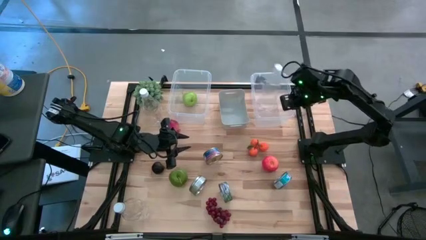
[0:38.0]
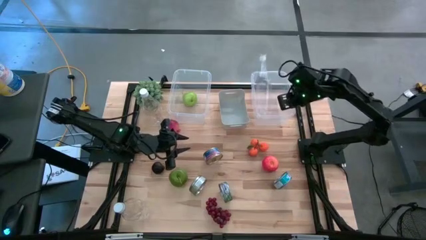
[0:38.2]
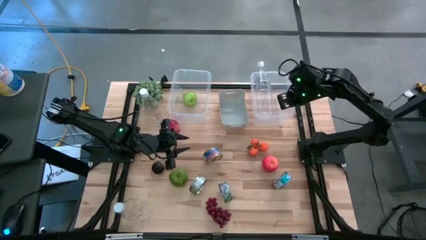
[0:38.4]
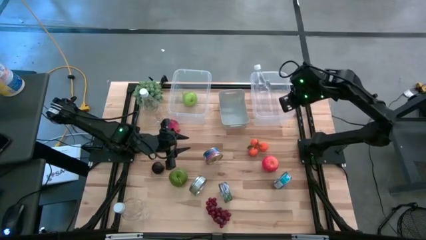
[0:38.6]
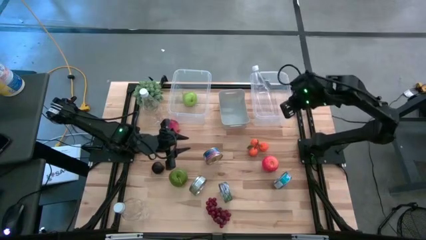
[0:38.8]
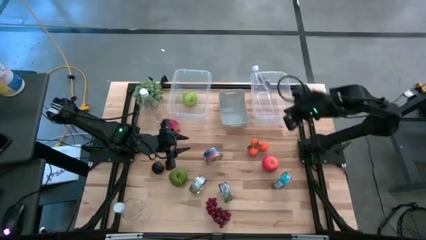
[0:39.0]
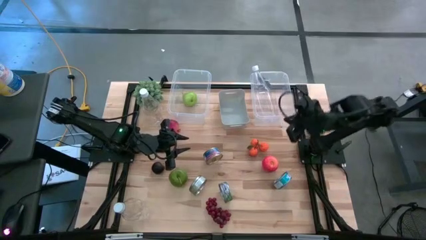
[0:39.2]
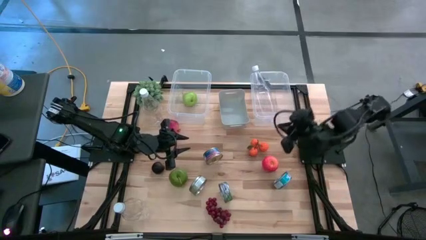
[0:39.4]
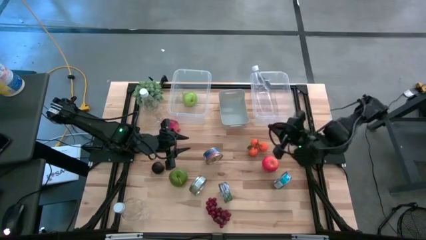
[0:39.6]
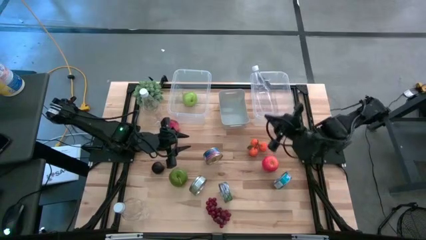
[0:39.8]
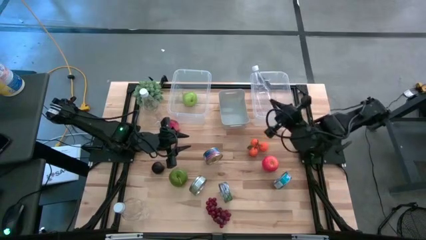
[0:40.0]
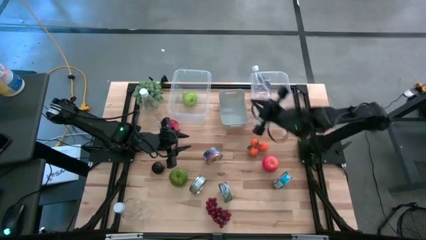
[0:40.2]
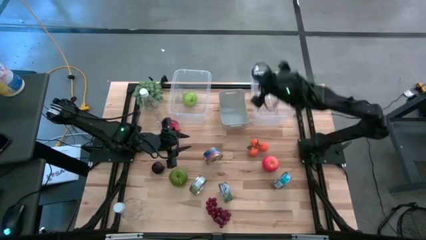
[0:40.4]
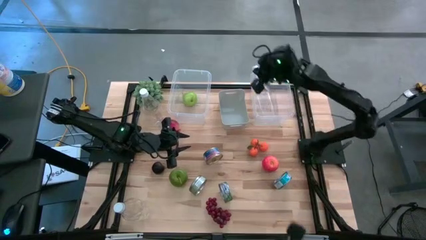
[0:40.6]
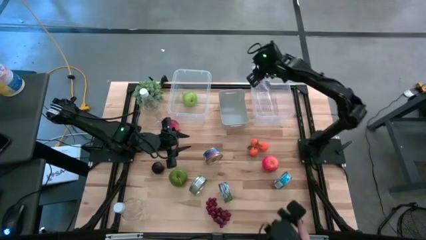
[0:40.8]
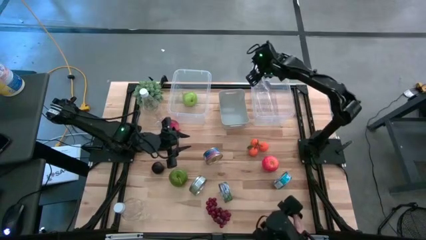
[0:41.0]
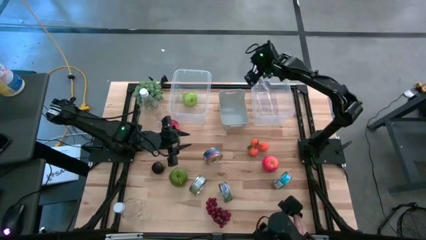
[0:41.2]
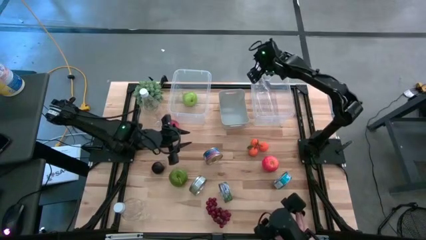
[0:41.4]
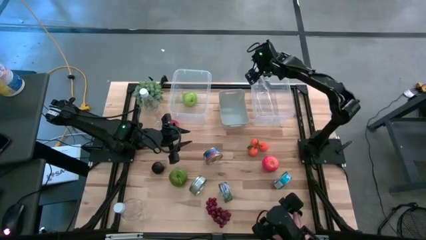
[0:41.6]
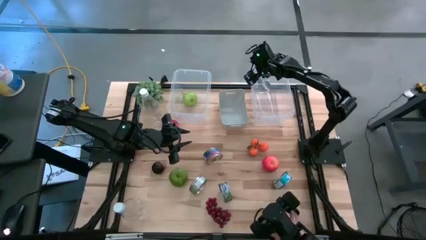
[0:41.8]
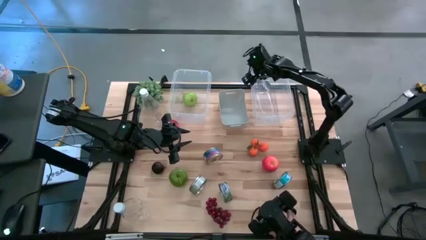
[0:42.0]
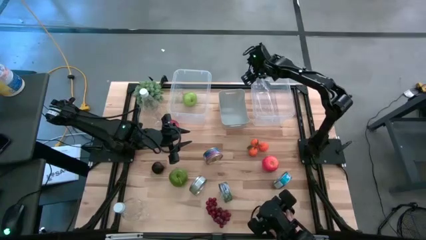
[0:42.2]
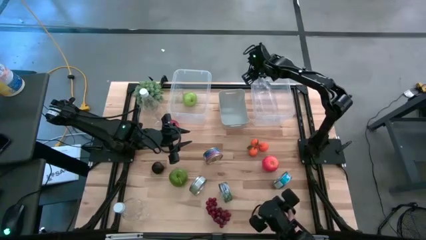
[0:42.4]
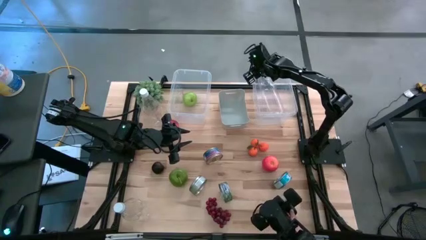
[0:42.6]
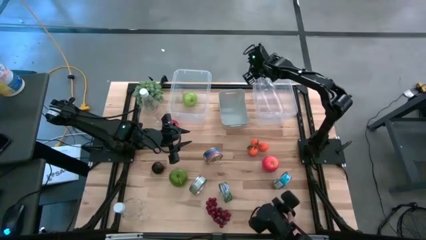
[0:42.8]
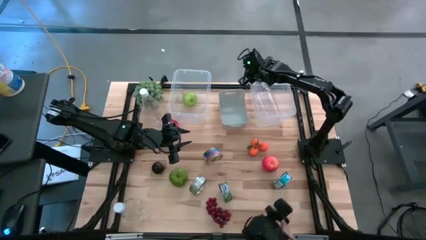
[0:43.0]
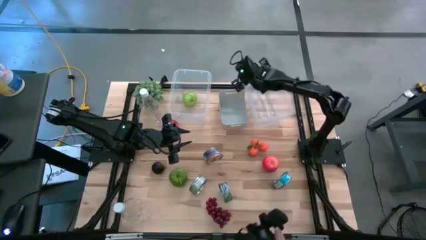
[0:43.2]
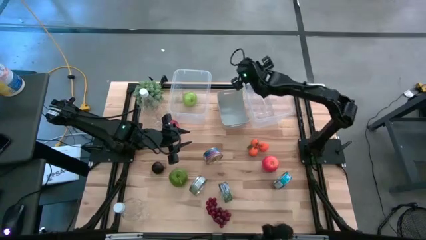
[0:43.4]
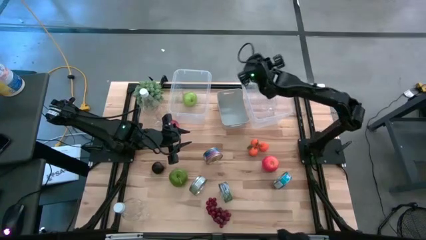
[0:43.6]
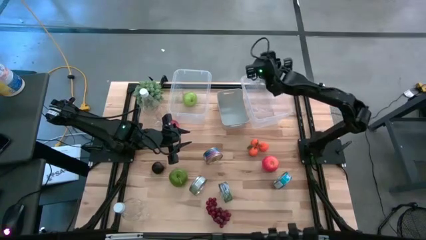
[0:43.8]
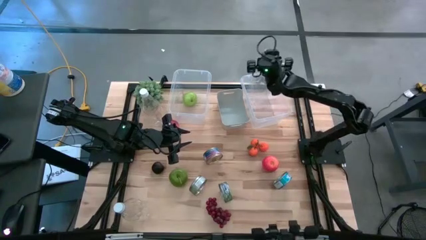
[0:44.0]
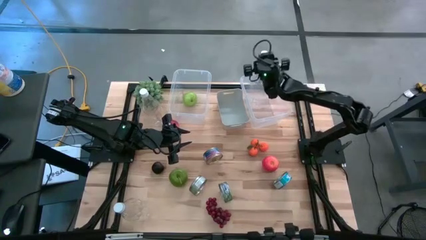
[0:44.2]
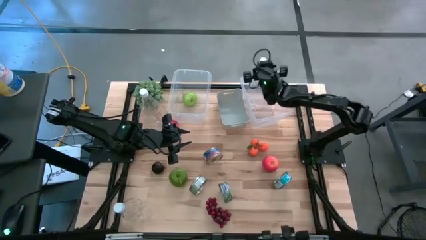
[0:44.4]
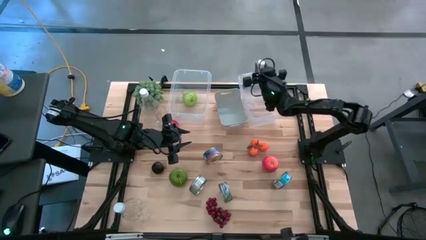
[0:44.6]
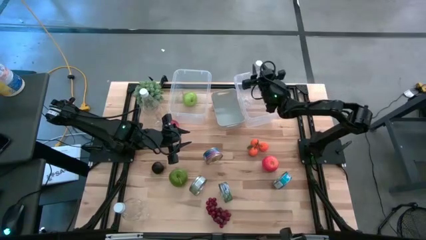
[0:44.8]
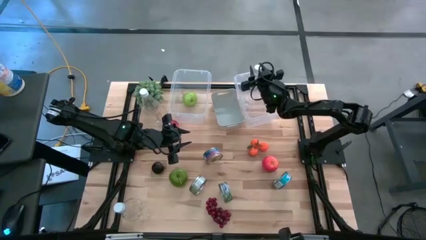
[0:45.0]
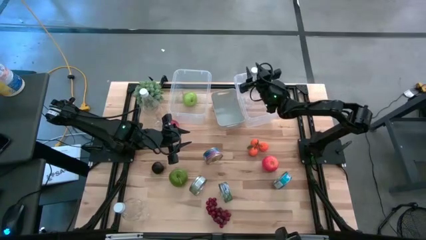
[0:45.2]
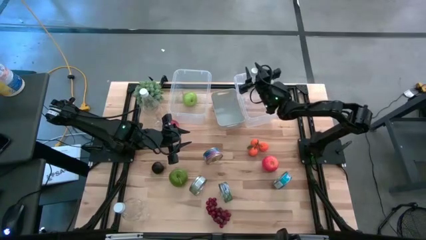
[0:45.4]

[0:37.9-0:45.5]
Task: Pick & Place Food Item
Put the bottom right plastic bottle into the right transparent bin

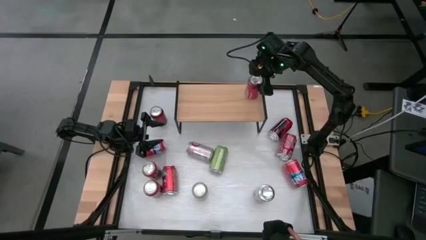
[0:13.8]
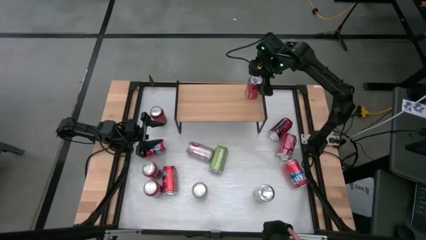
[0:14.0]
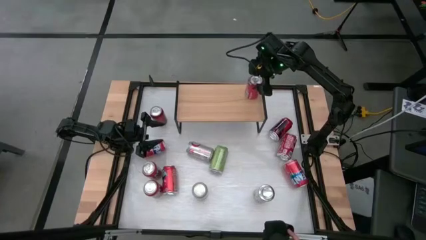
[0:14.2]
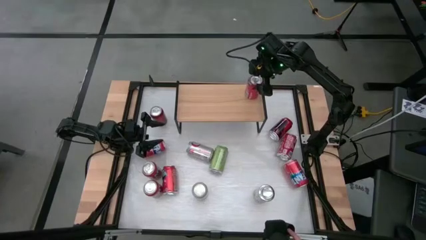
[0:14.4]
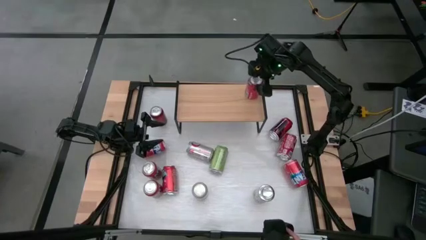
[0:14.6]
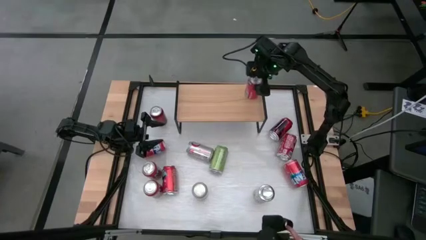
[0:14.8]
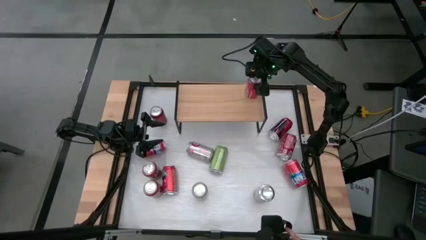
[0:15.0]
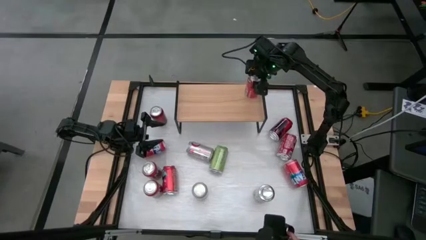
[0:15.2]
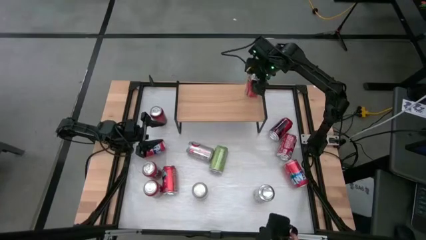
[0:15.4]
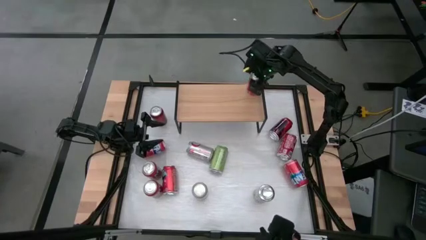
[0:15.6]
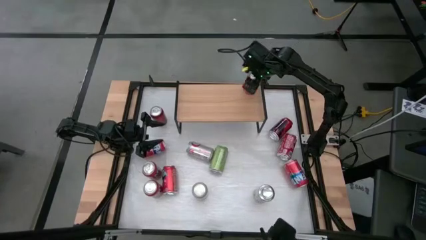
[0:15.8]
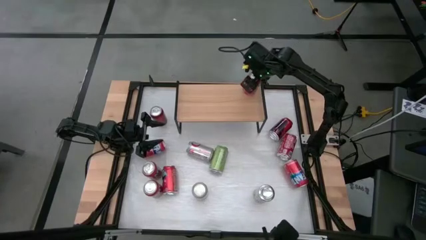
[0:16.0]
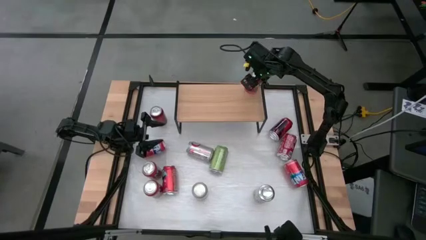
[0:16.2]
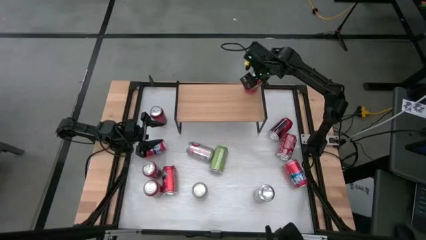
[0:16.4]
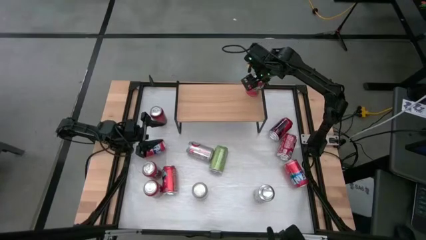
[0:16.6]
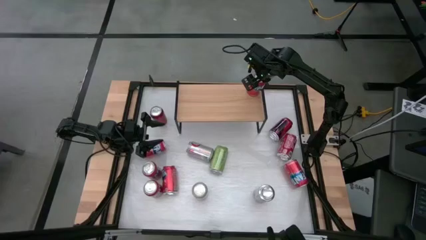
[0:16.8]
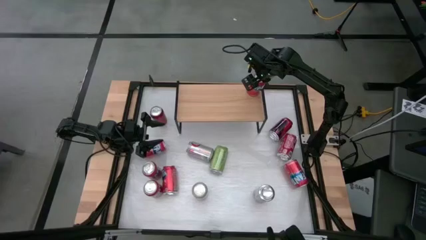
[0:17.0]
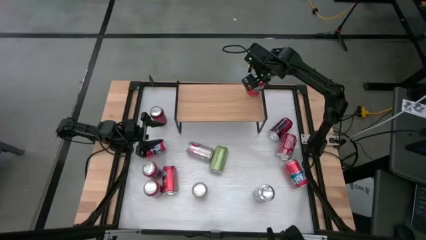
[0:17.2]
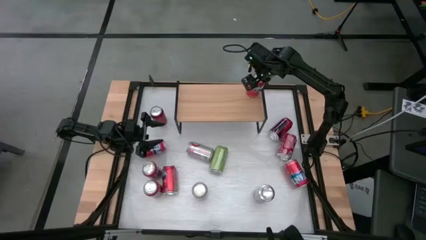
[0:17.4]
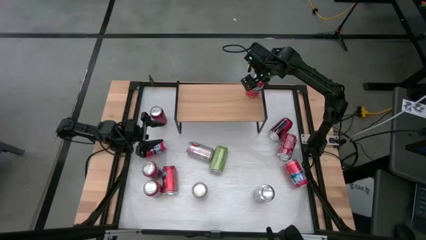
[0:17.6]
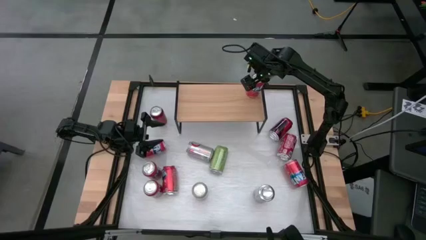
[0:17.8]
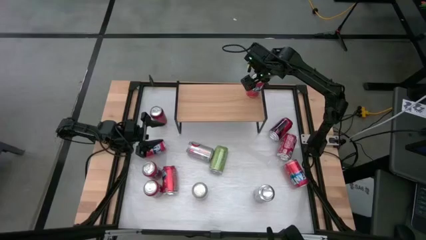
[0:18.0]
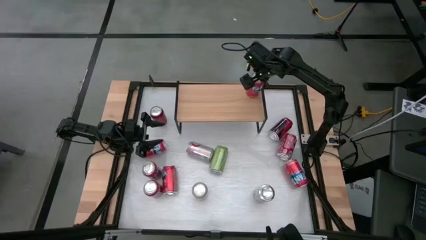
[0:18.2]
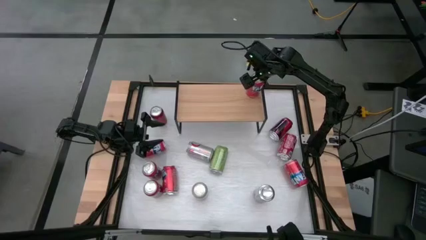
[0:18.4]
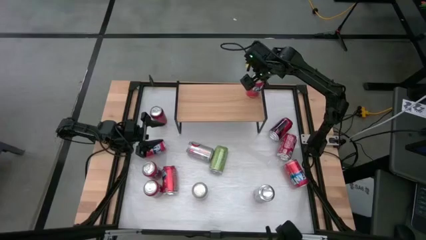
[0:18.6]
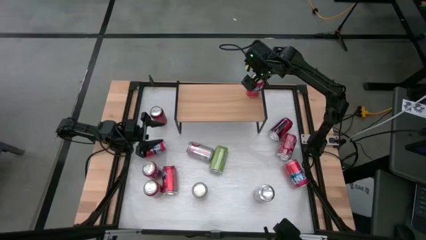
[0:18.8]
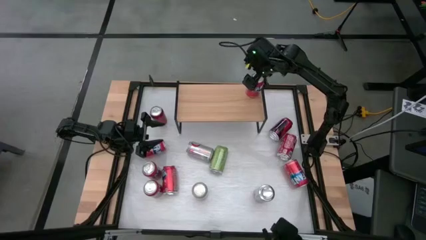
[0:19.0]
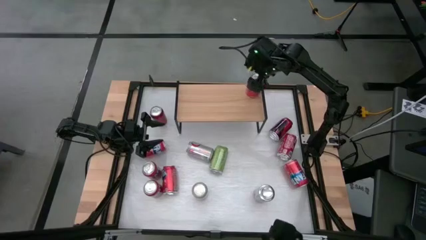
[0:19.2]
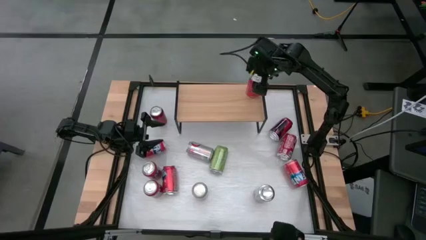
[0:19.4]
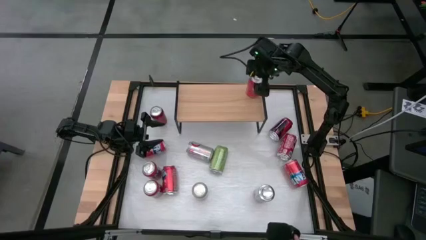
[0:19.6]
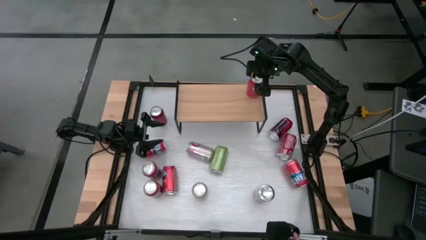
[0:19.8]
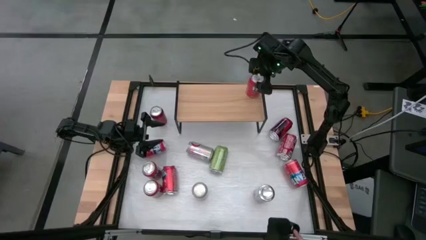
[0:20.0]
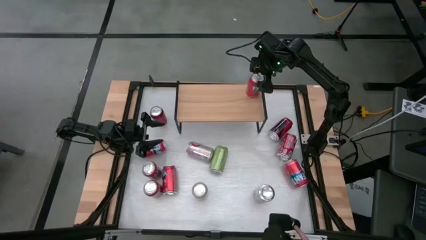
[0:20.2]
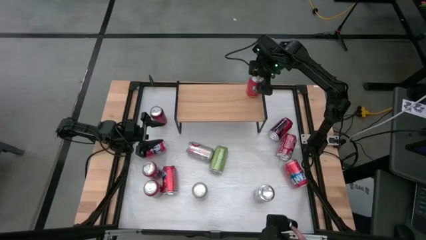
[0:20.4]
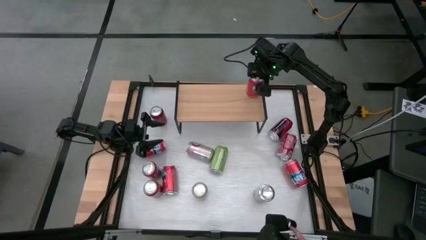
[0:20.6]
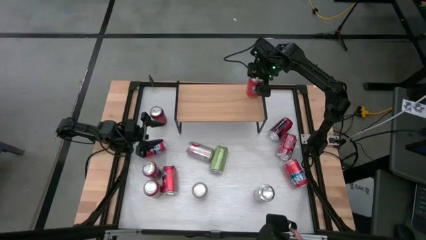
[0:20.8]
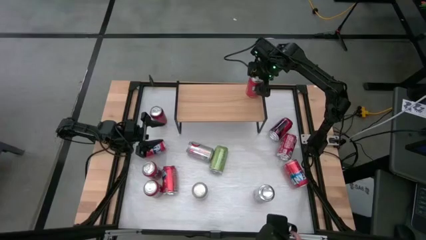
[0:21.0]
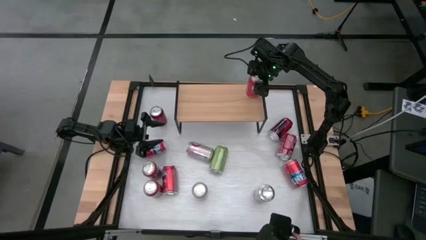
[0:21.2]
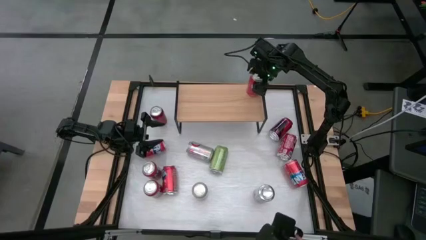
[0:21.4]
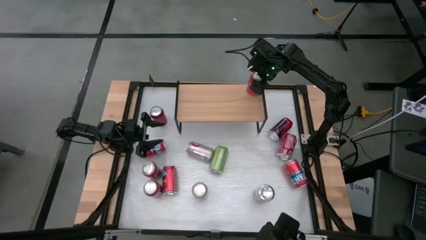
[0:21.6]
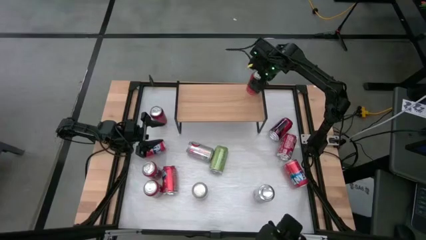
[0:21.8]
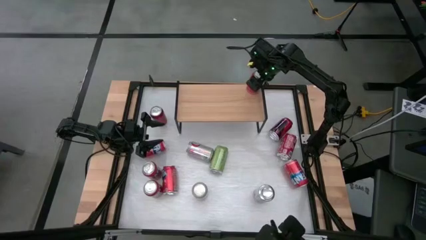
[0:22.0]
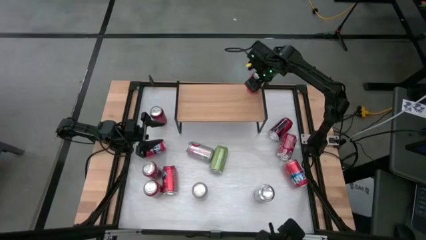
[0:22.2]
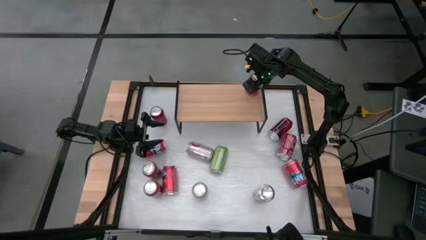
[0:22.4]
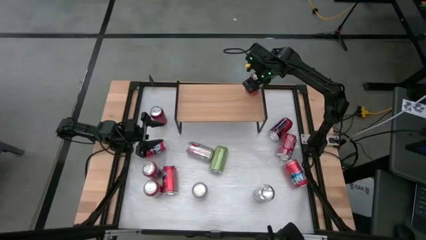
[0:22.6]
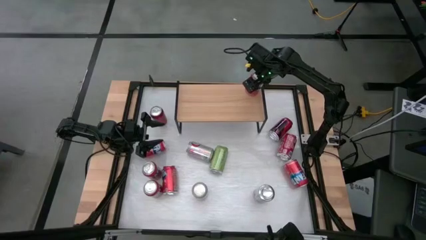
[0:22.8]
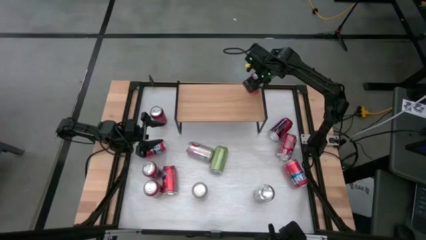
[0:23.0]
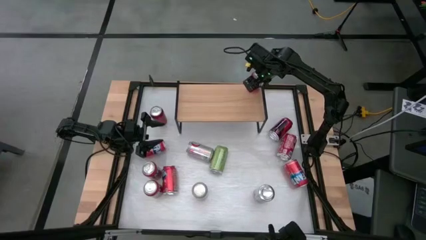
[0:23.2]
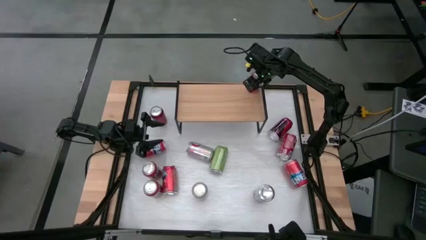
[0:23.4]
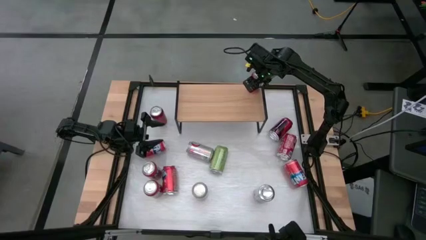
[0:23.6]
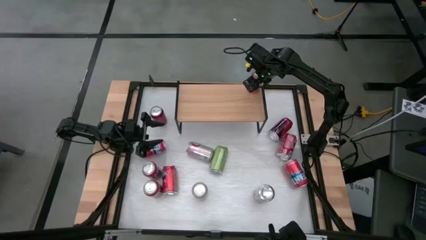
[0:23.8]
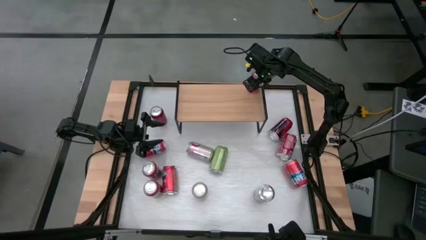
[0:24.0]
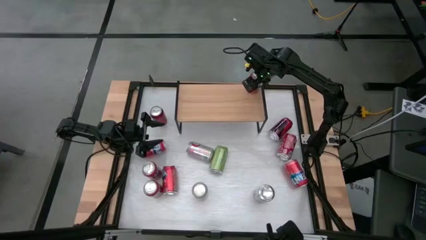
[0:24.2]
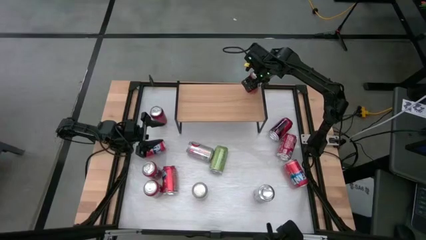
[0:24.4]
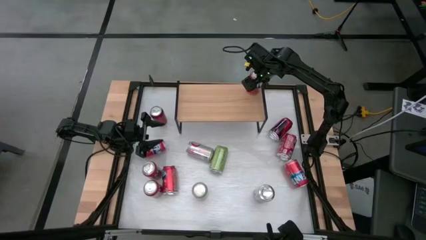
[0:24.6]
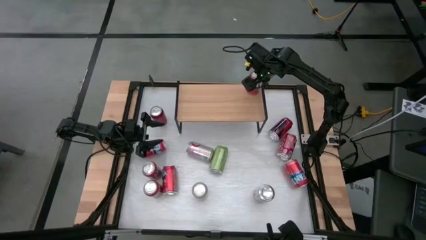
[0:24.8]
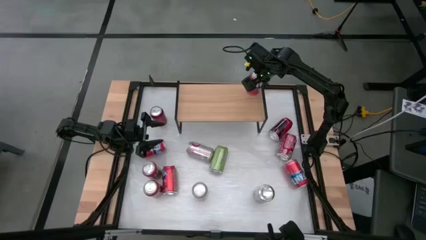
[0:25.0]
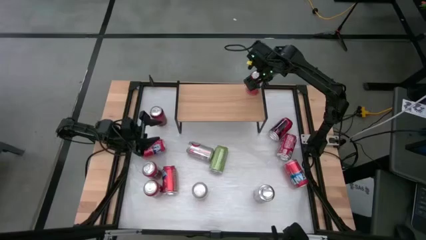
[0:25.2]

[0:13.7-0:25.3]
Task: Place canned beverage on shelf
Put the orange soda can on the shelf
